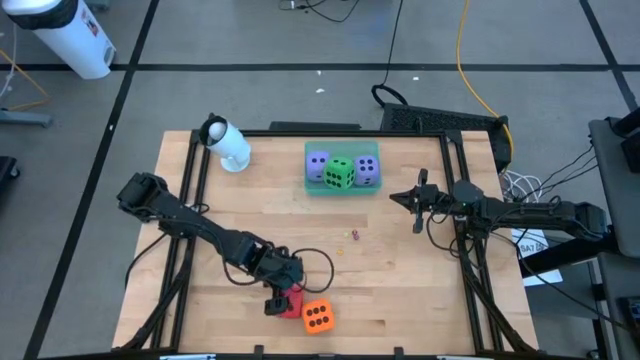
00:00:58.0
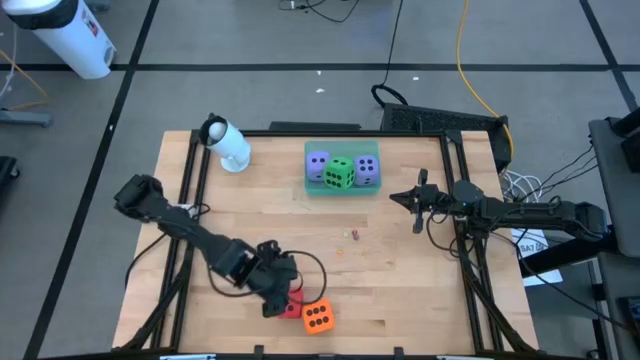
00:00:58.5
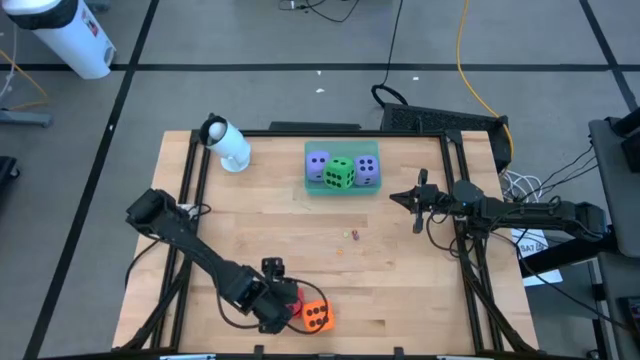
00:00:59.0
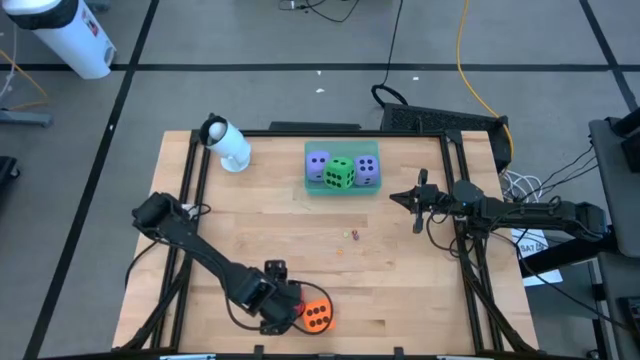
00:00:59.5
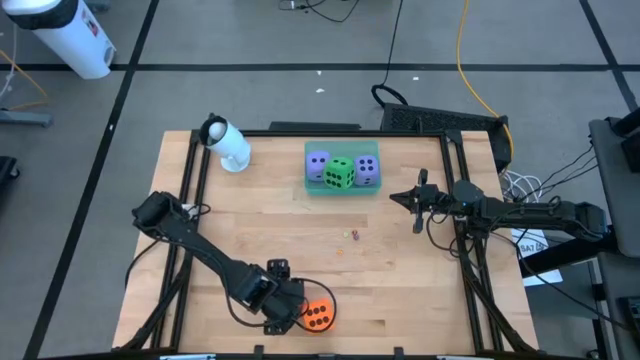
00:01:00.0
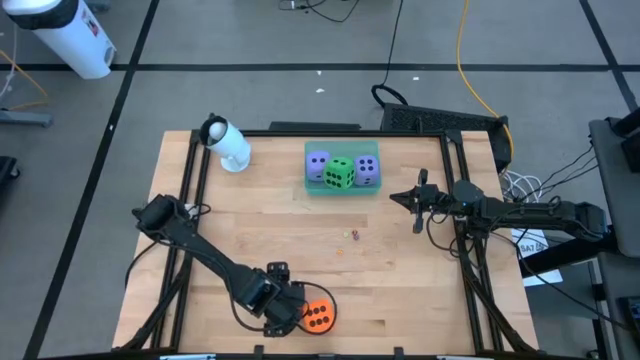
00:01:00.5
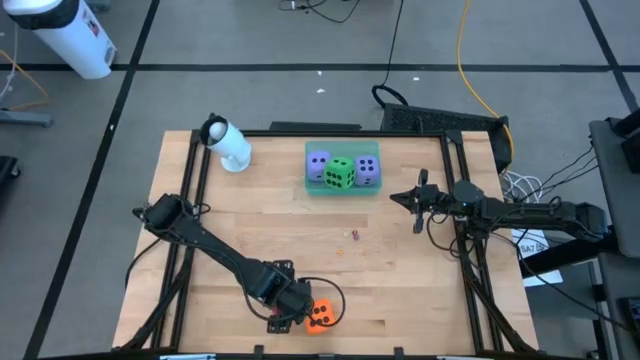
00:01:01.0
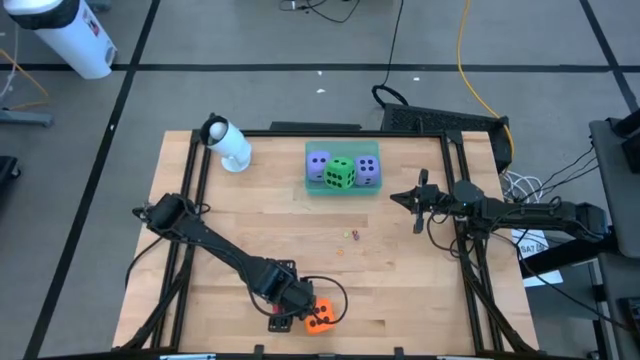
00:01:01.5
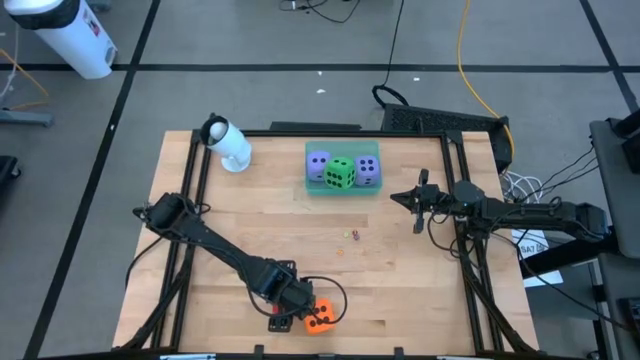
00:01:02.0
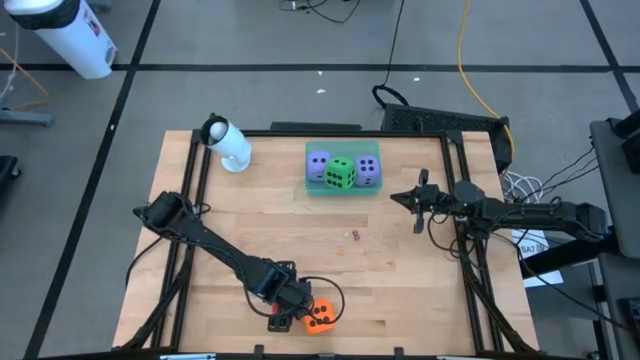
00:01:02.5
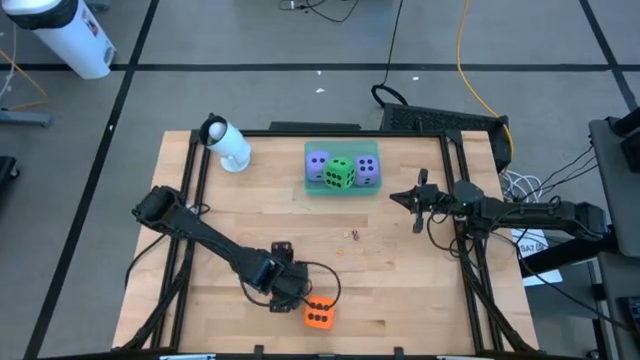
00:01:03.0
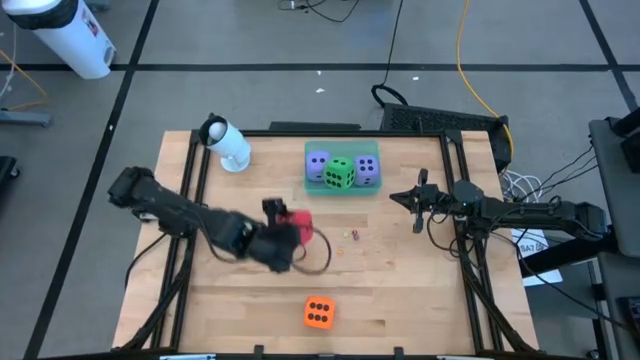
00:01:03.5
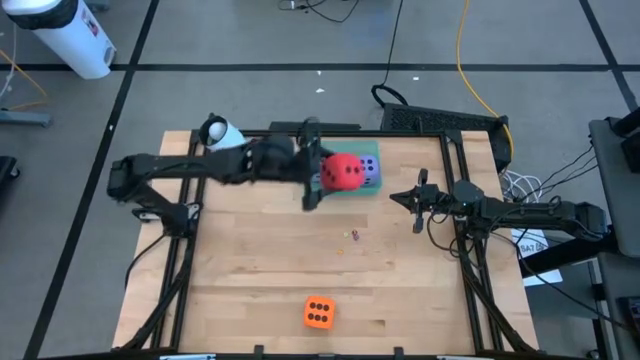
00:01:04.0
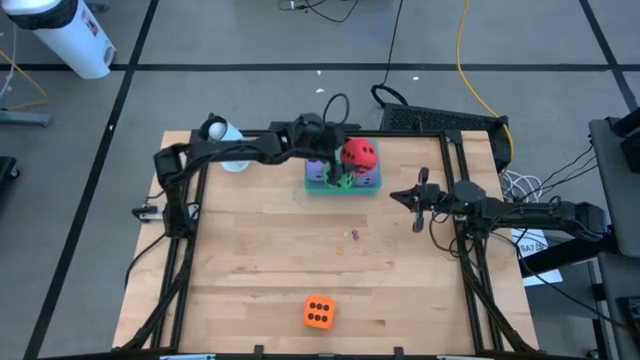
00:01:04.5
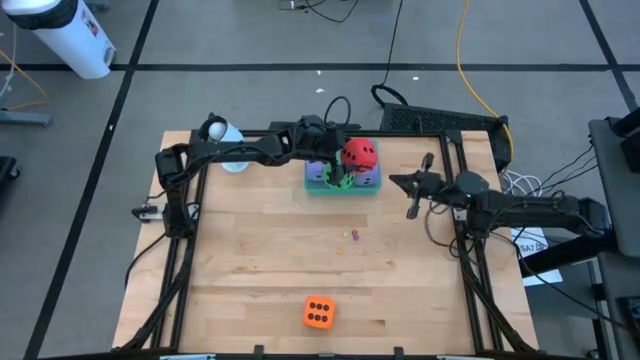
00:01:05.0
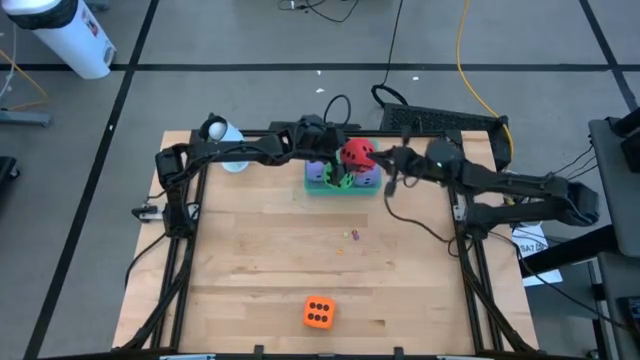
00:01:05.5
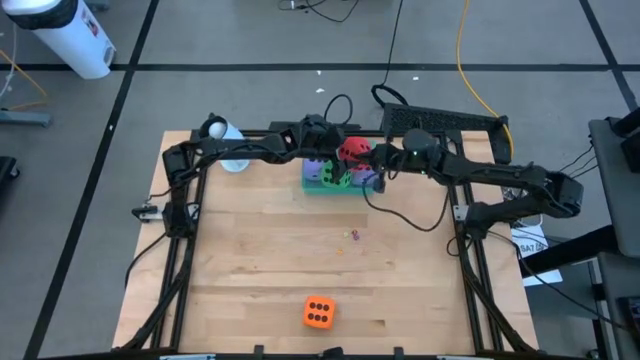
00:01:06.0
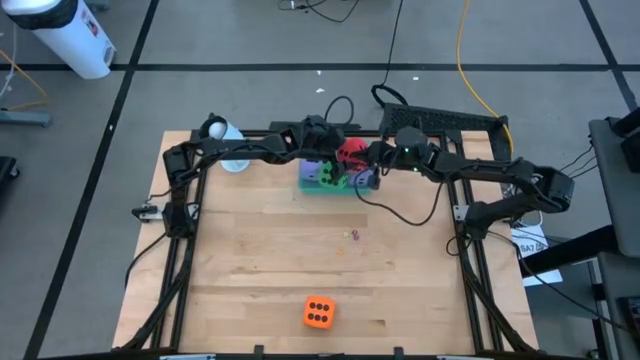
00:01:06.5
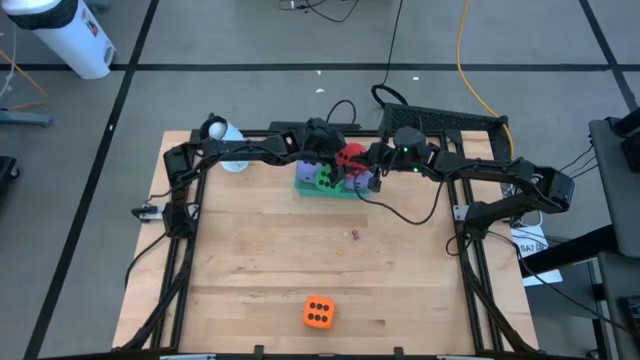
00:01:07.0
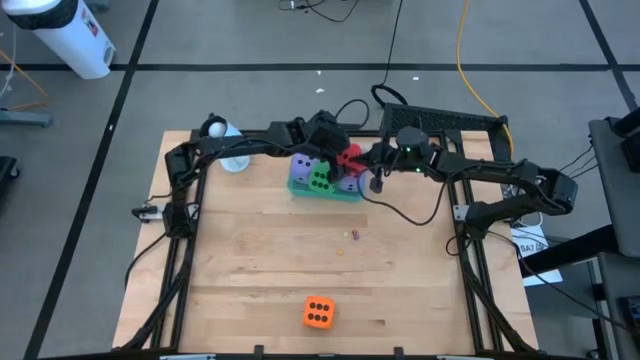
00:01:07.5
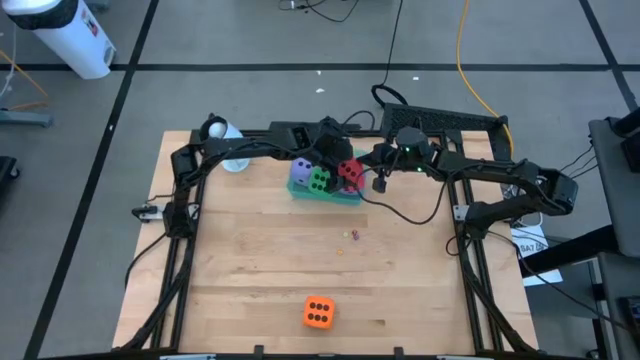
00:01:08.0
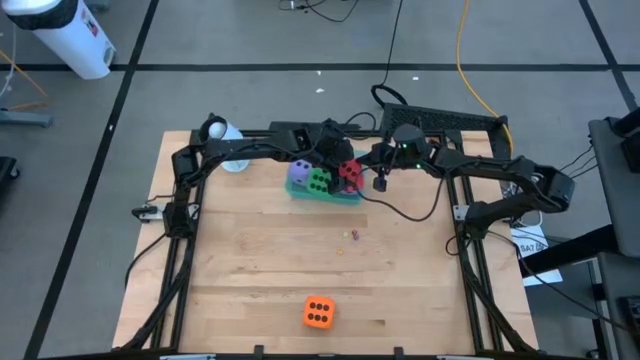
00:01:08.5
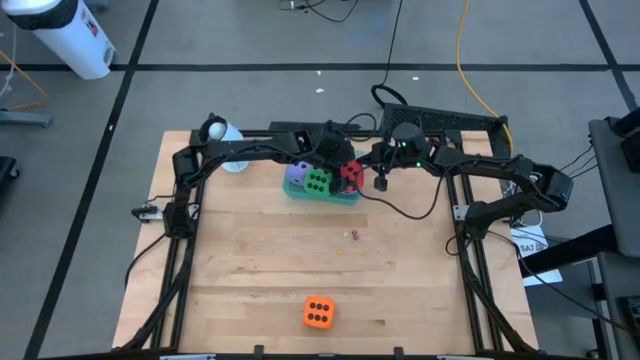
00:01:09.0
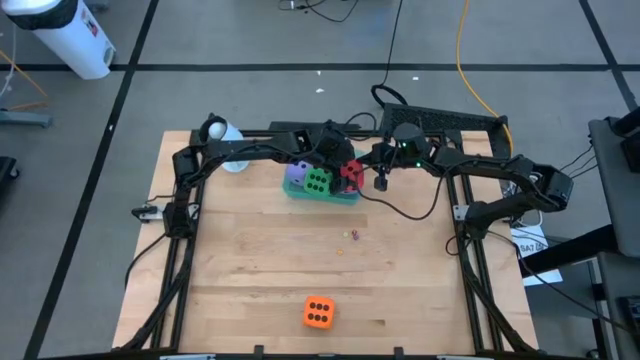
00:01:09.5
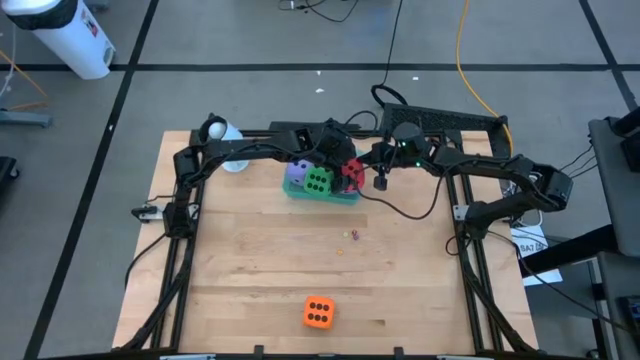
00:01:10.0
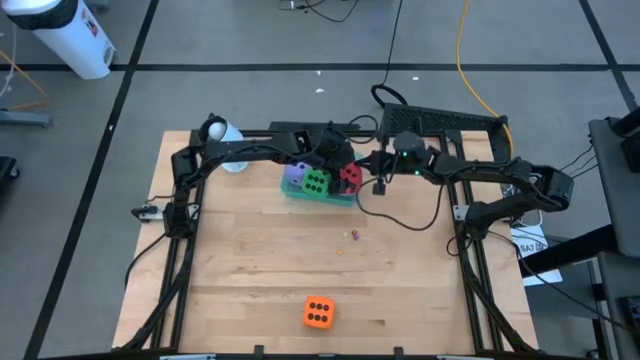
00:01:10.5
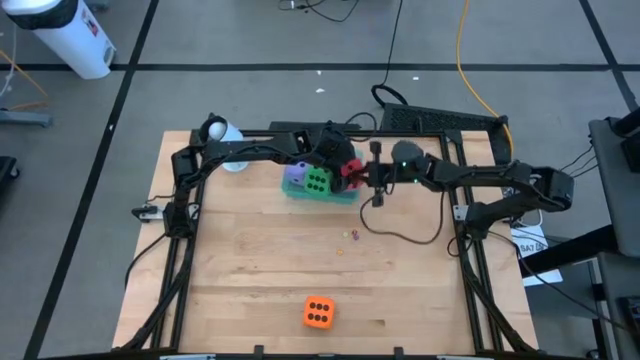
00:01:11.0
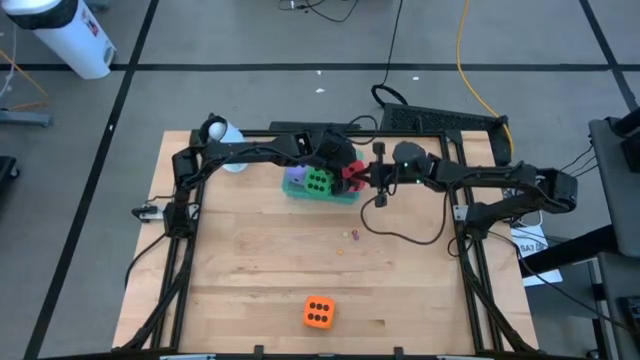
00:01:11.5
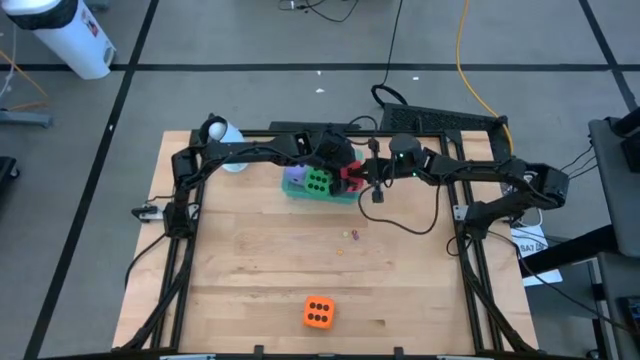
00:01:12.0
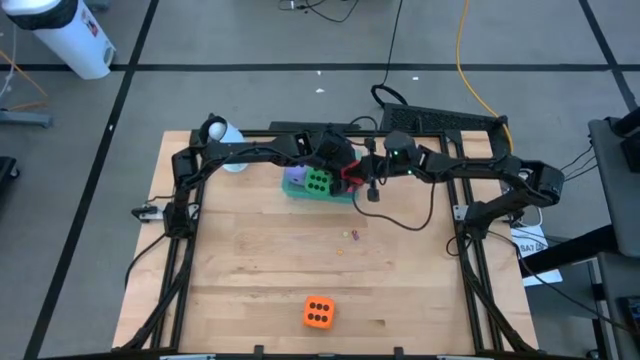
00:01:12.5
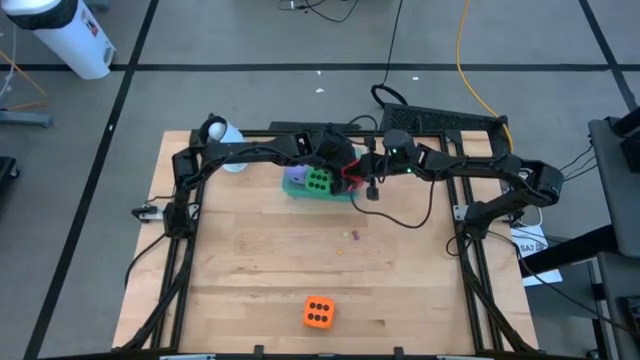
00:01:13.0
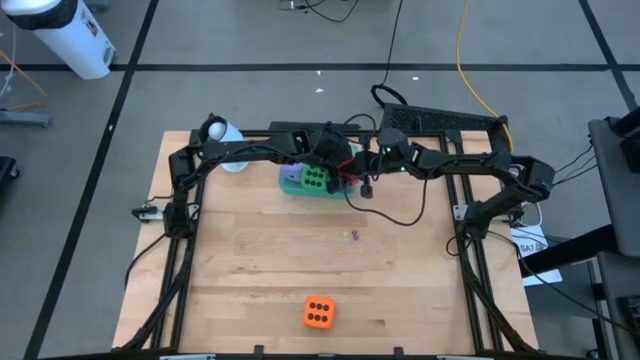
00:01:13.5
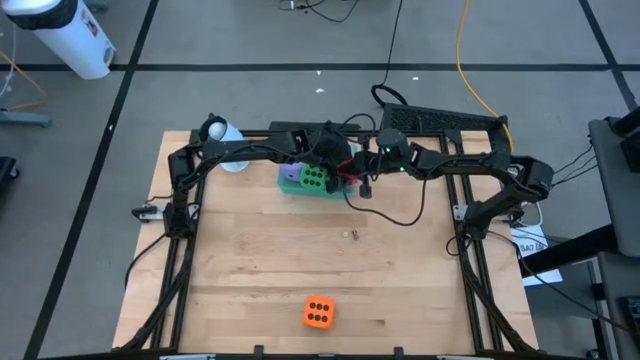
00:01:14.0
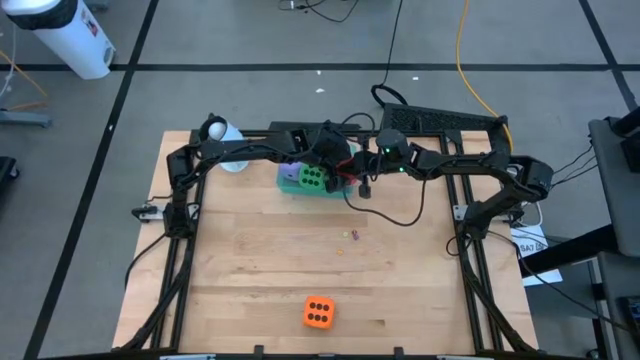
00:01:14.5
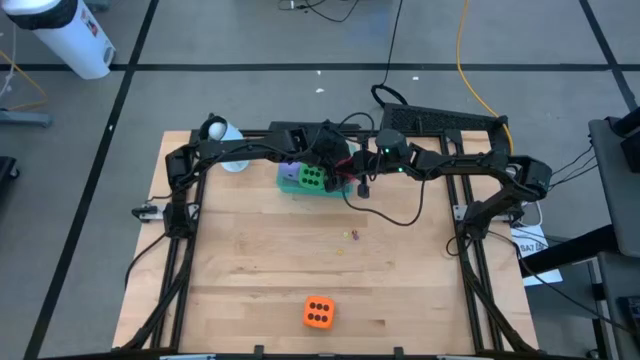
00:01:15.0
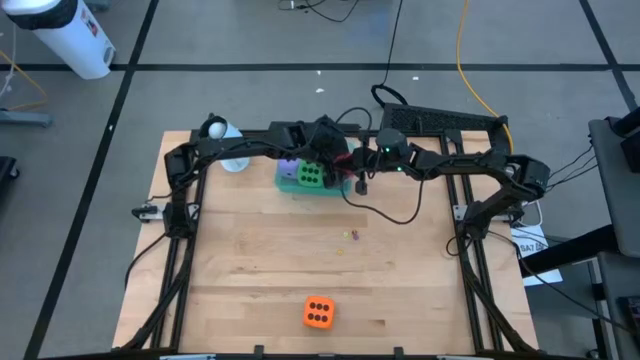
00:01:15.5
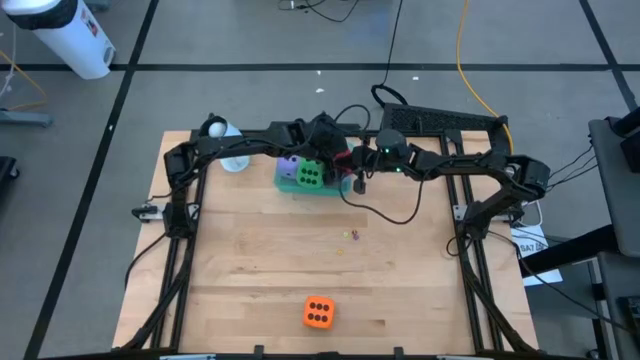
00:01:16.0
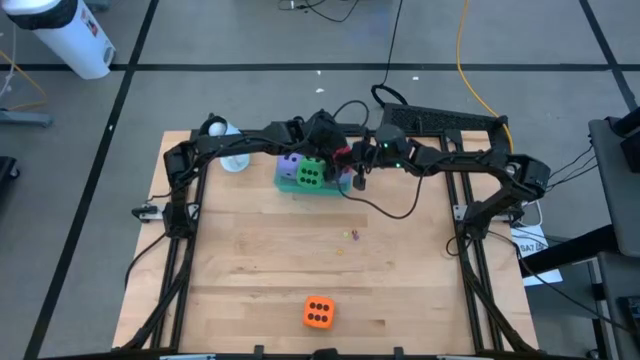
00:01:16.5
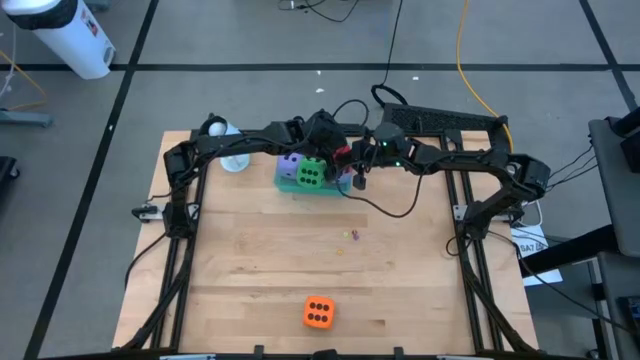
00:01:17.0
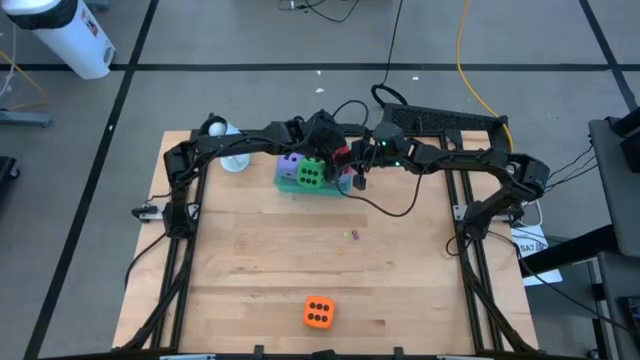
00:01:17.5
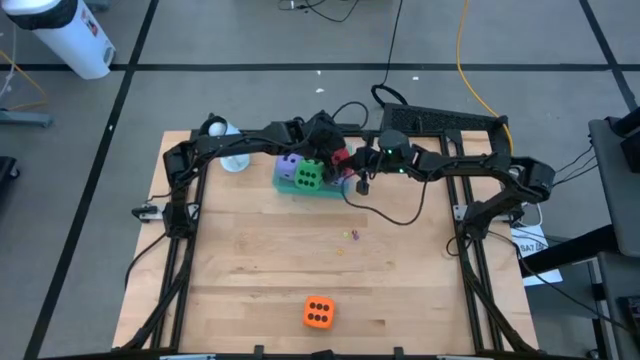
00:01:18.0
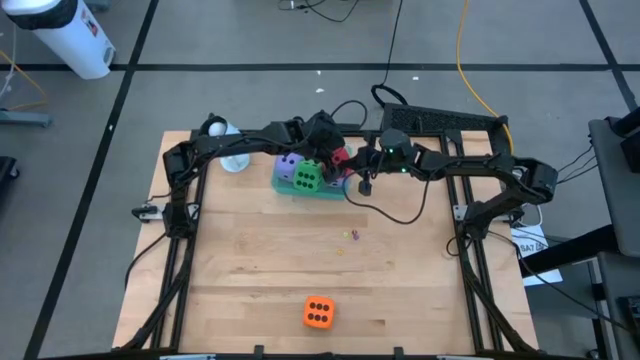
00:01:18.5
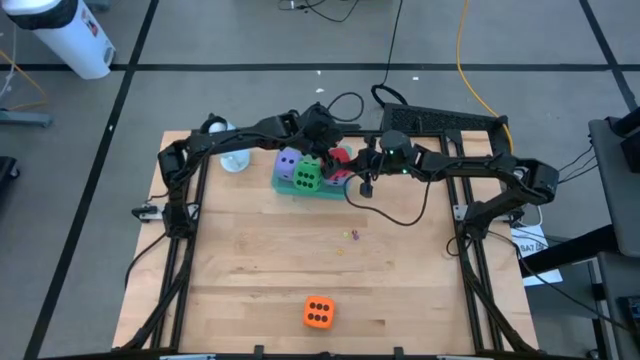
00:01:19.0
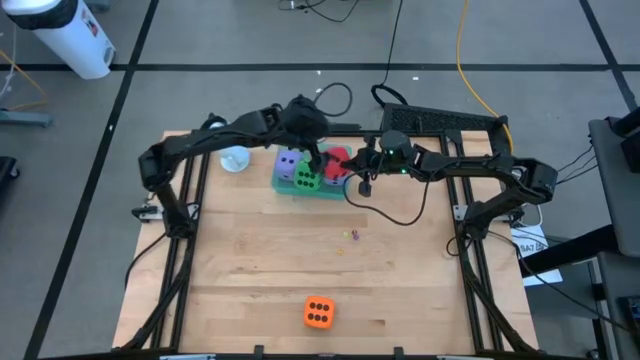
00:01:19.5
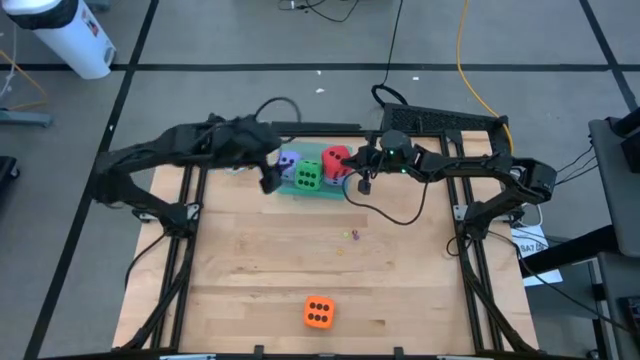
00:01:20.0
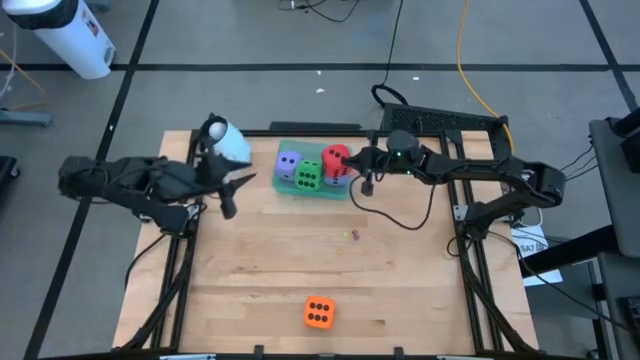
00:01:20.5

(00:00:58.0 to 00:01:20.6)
Task: Pick & Place Dice
Put the big red dice into the green bin
